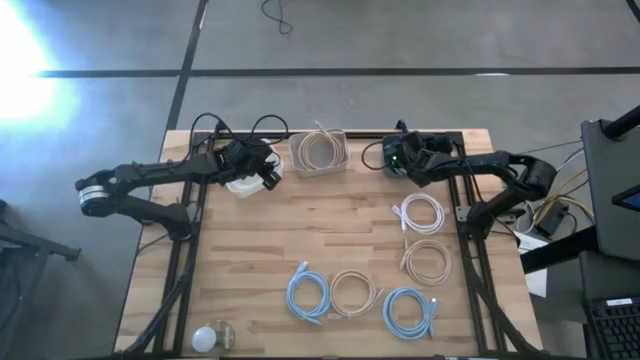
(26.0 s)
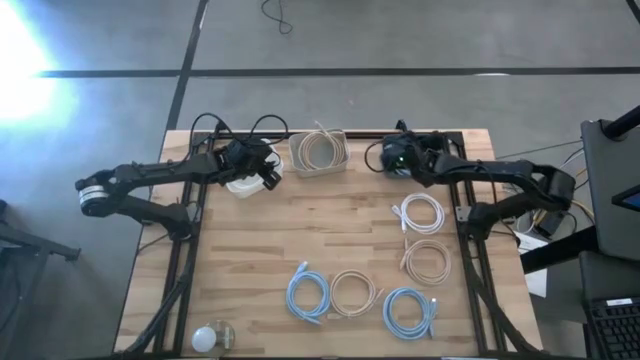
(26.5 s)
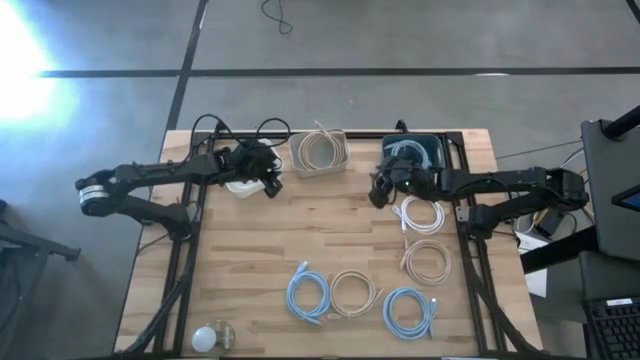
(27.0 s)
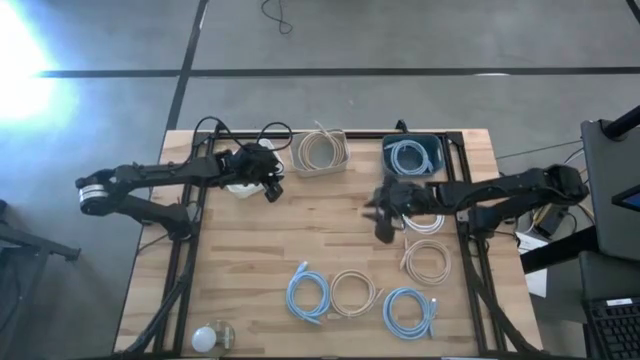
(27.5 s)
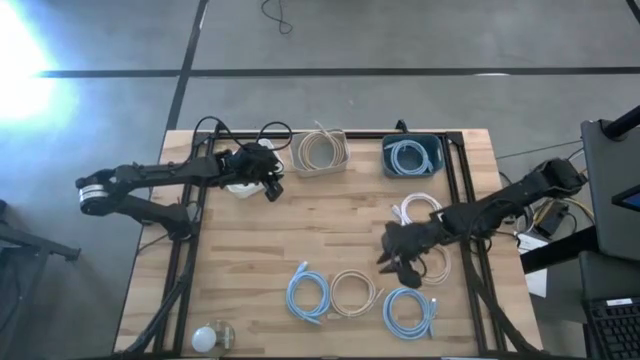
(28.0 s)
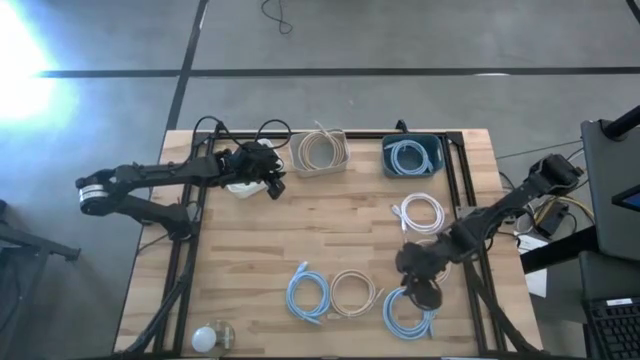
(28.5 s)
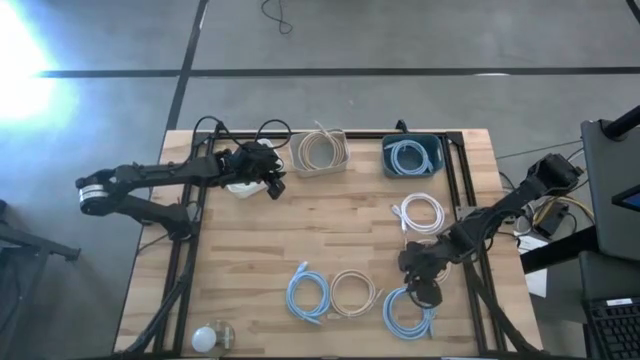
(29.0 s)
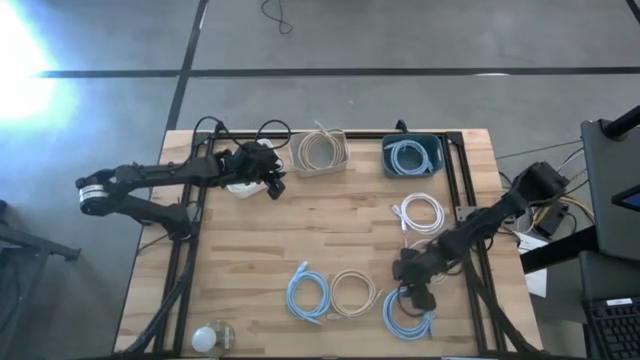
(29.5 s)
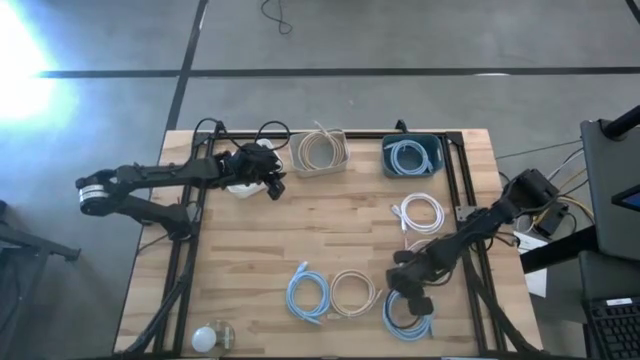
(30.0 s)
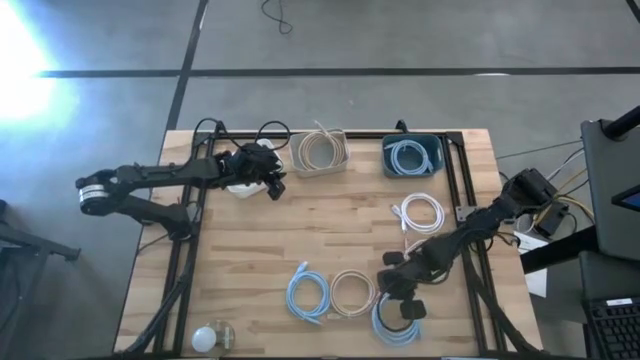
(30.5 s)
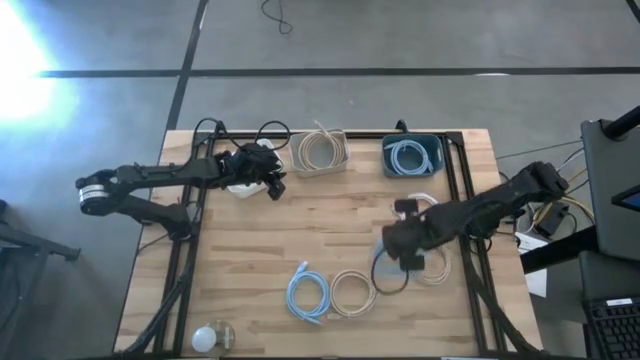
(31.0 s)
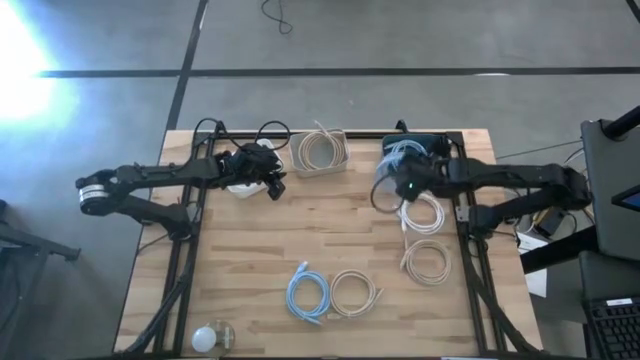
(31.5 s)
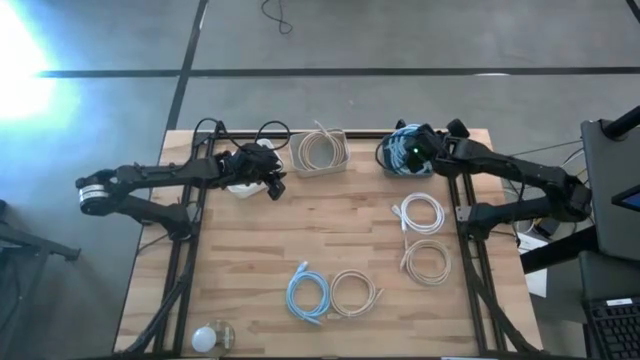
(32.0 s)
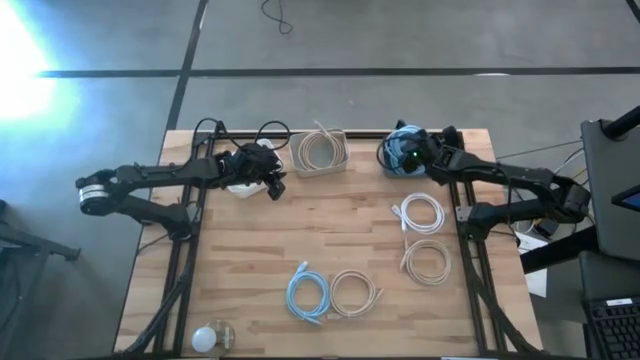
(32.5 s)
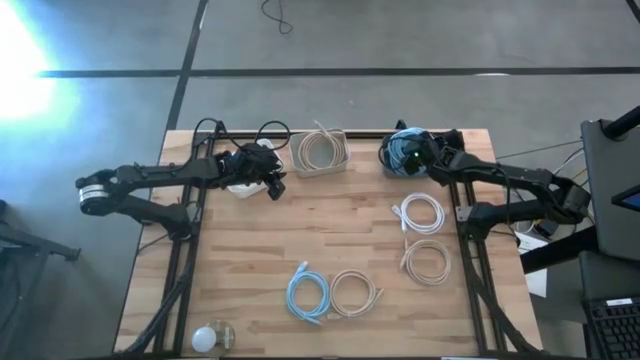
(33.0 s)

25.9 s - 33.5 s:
Task: Sort HDMI cables
Put the right light blue HDMI cable into the blue bin

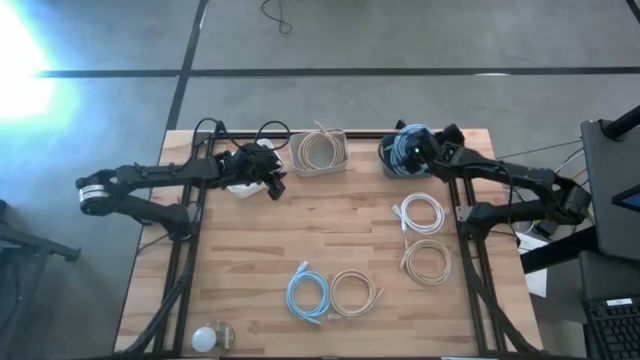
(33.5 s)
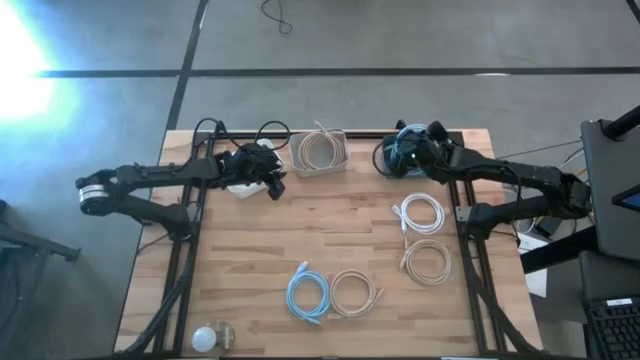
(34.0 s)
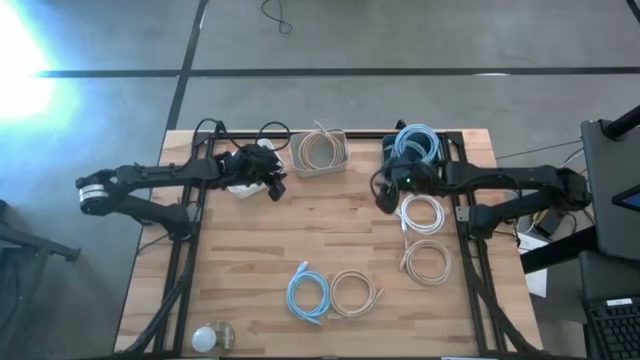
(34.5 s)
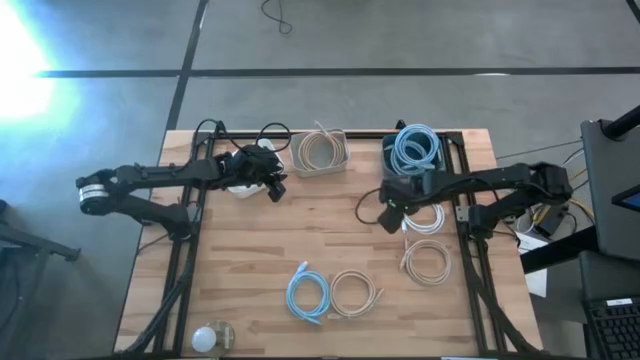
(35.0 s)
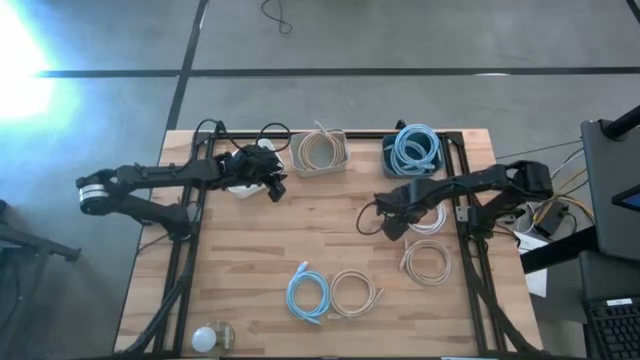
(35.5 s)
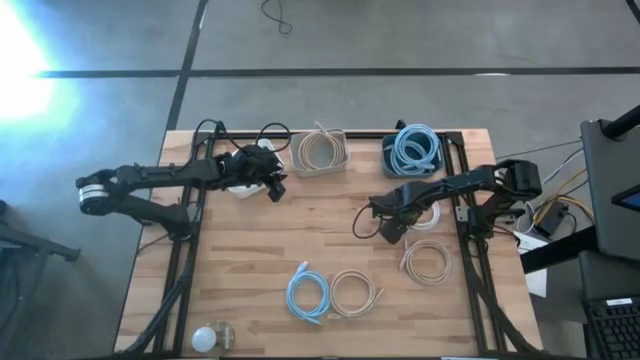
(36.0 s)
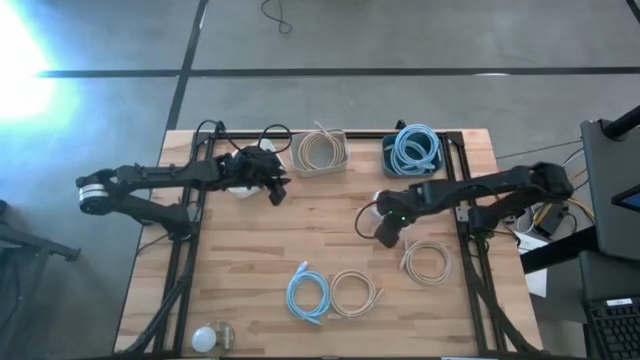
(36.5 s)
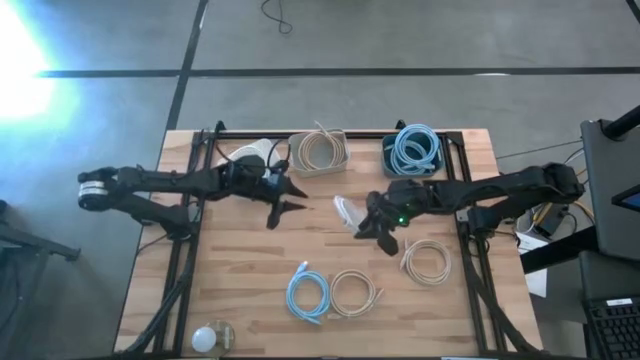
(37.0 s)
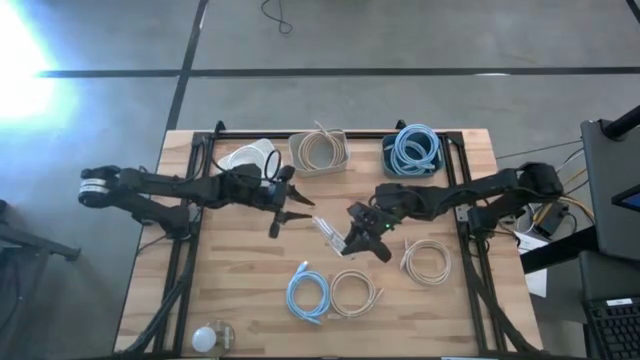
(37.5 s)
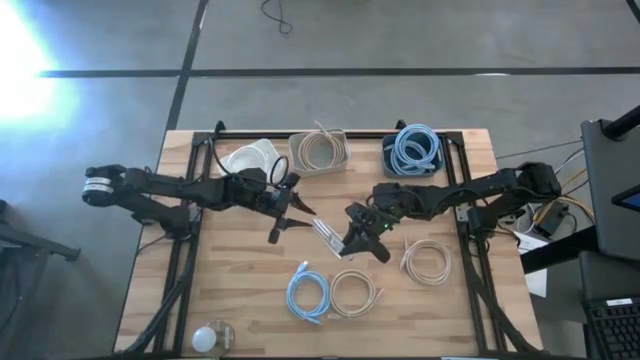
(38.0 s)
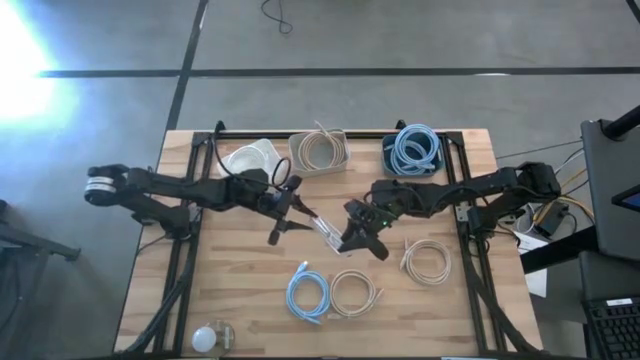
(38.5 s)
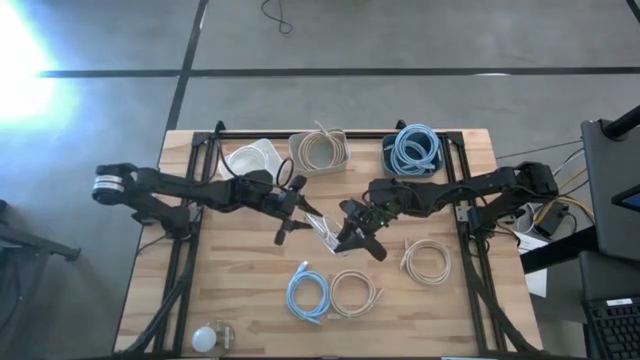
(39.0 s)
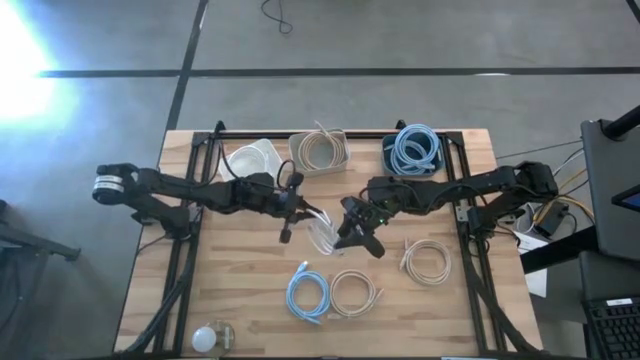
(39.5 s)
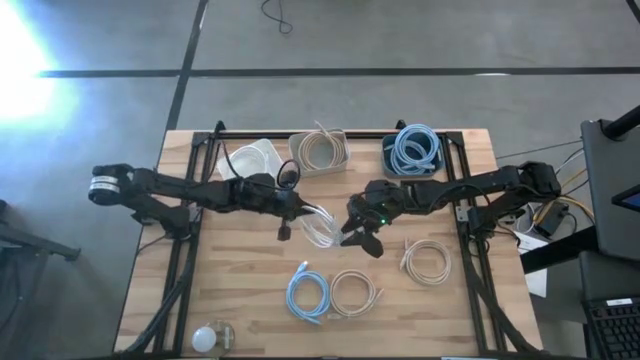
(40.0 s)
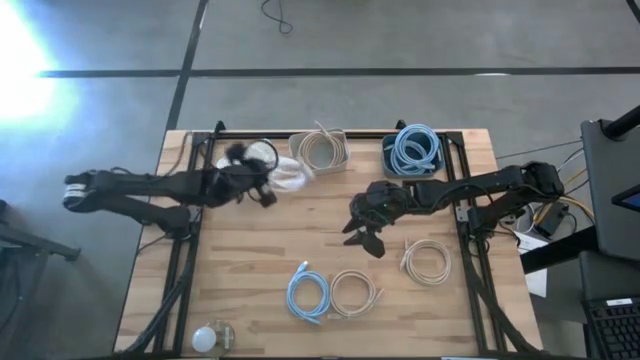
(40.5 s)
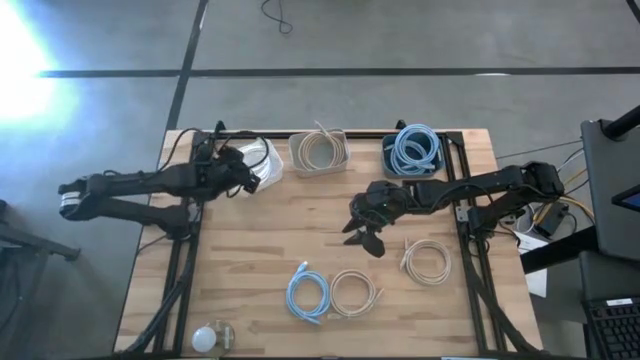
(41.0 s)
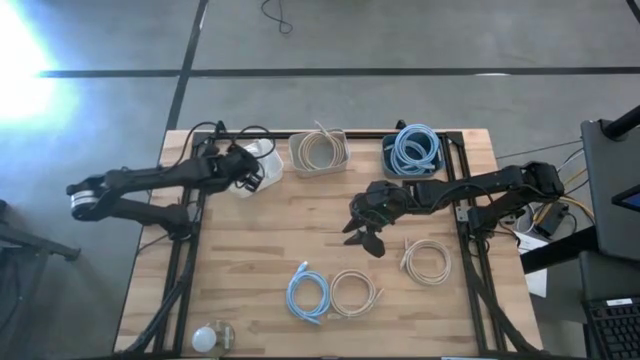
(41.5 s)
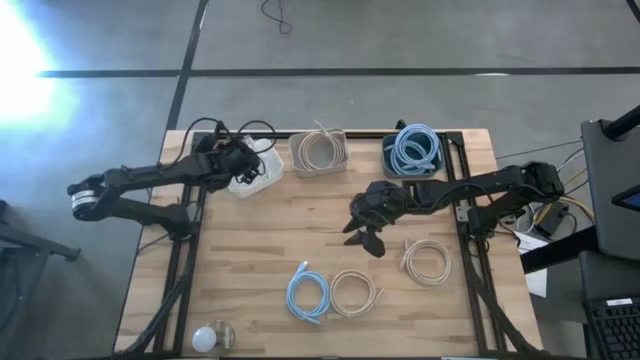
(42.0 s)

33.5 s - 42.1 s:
Put the white HDMI cable into the white bin

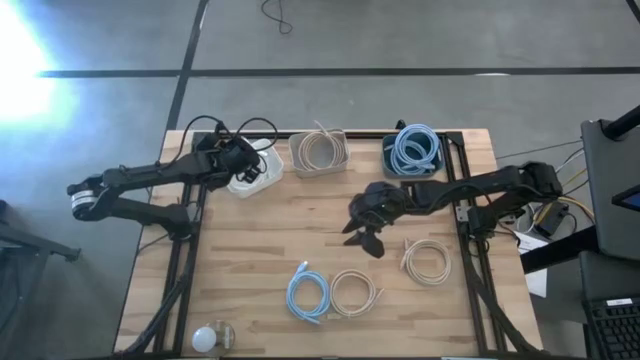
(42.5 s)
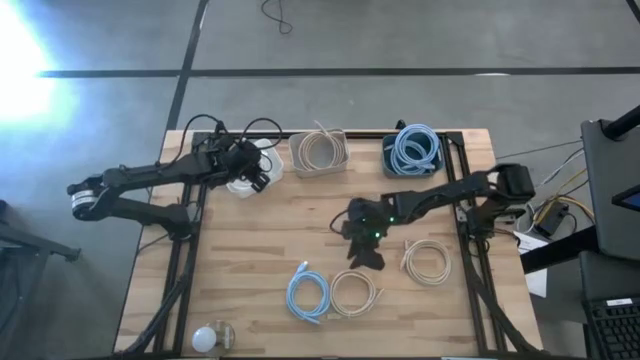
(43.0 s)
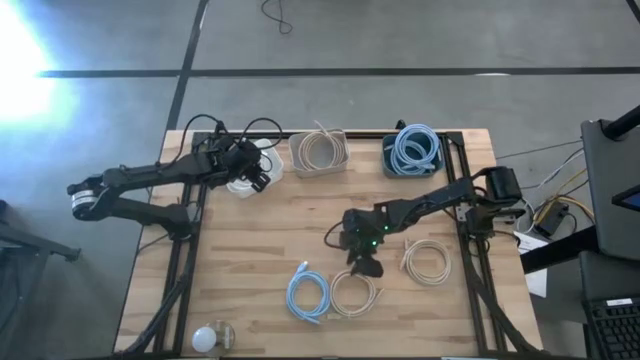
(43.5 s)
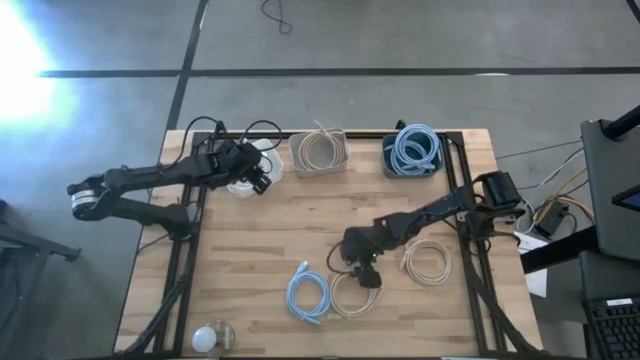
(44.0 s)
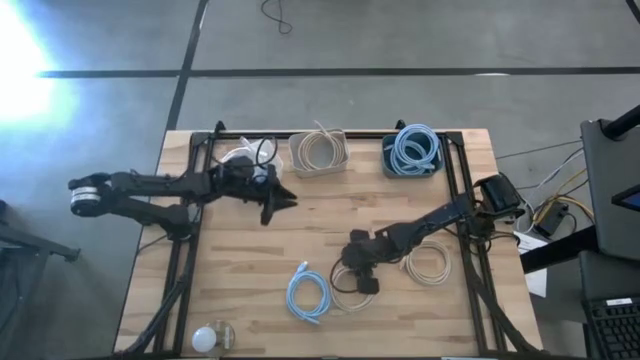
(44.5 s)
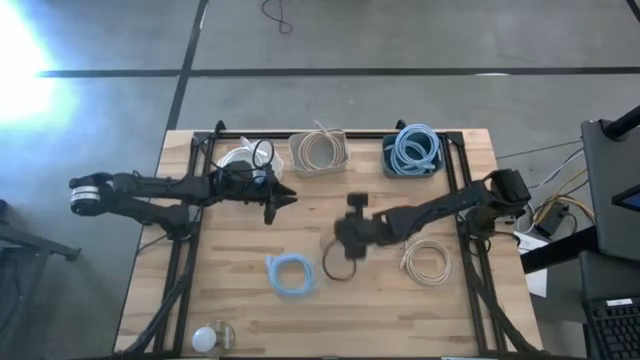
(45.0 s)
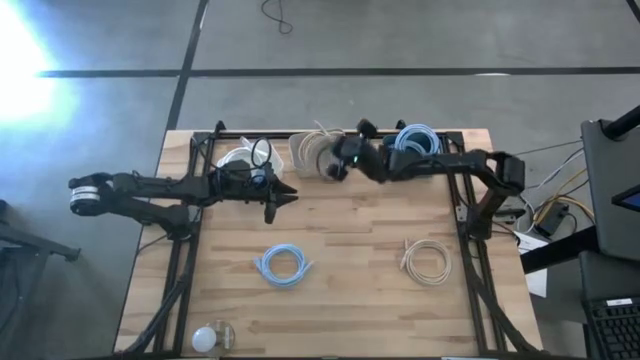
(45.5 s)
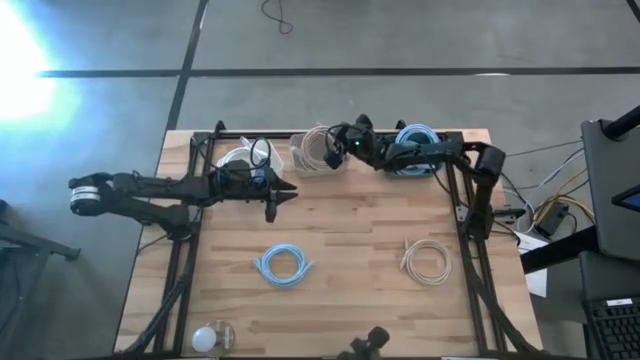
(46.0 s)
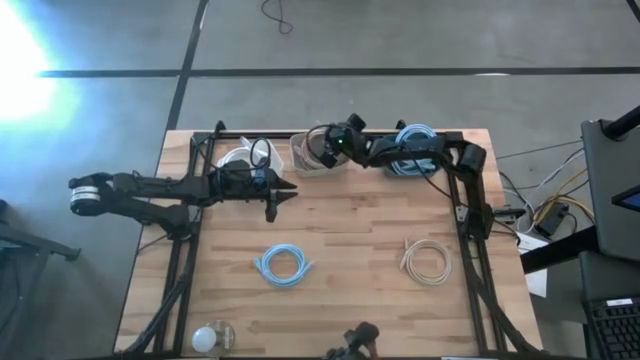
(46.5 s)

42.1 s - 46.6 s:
Put the bottom left light brown HDMI cable into the gray bin
